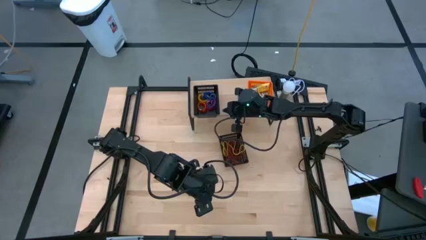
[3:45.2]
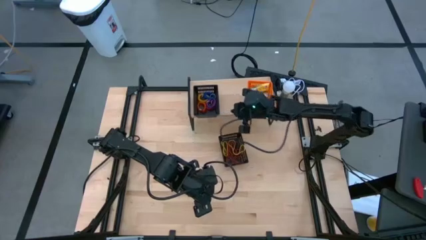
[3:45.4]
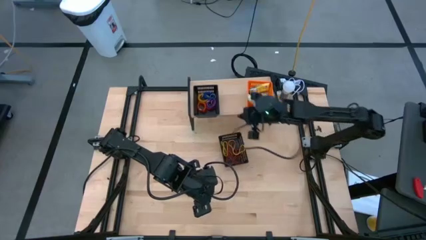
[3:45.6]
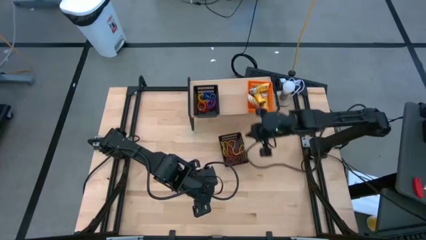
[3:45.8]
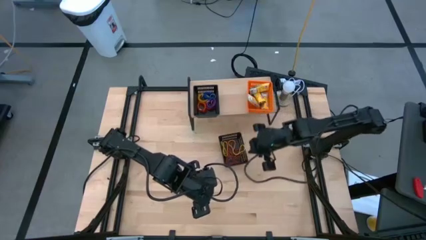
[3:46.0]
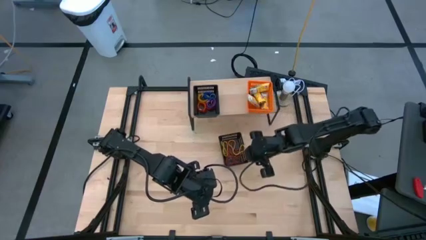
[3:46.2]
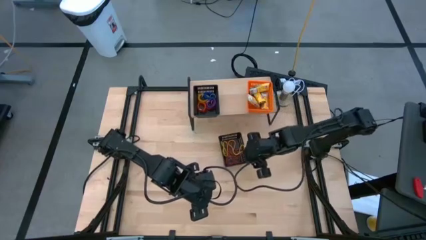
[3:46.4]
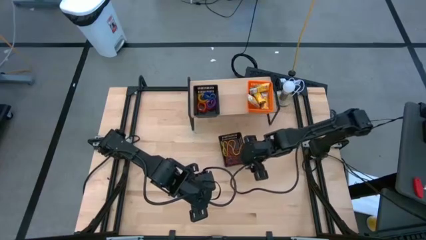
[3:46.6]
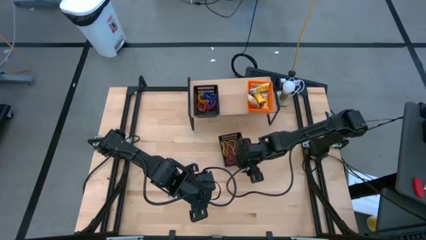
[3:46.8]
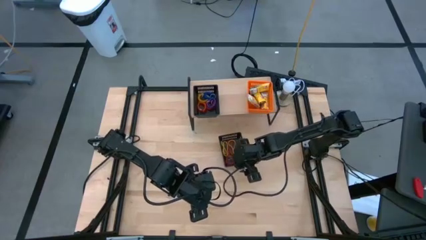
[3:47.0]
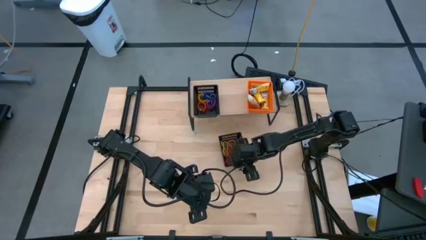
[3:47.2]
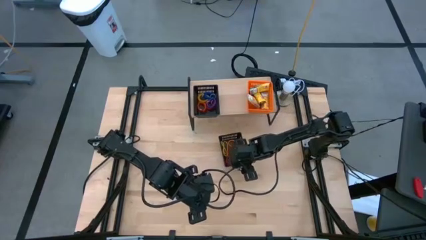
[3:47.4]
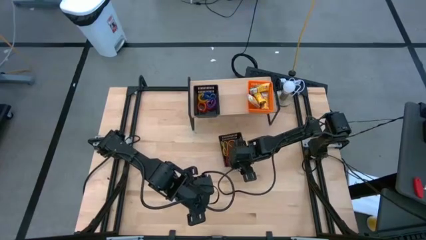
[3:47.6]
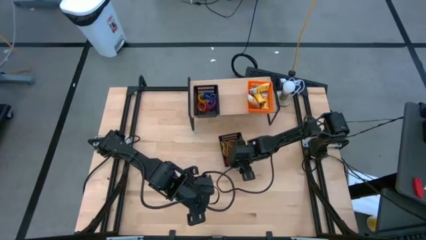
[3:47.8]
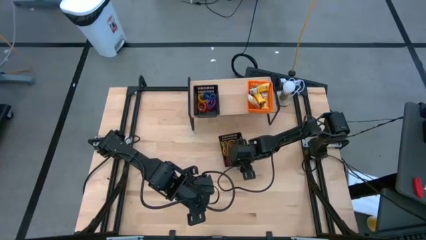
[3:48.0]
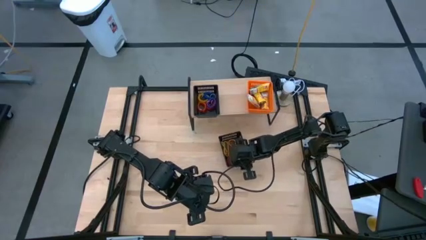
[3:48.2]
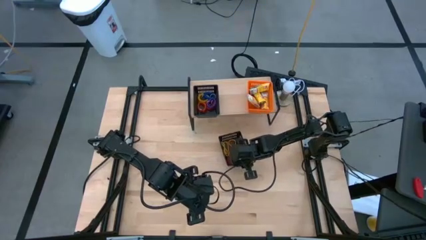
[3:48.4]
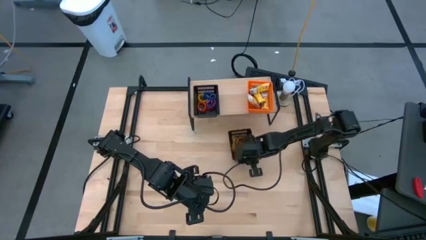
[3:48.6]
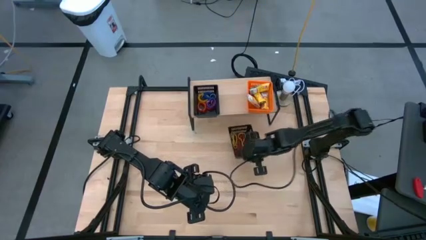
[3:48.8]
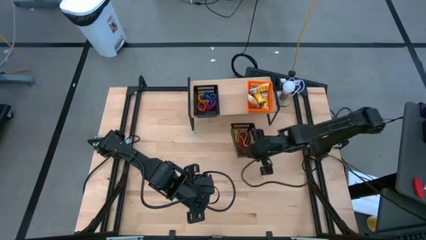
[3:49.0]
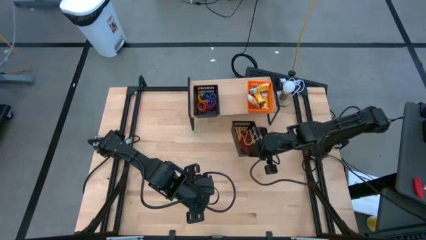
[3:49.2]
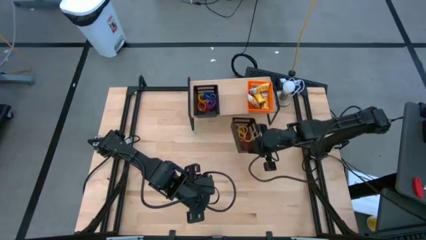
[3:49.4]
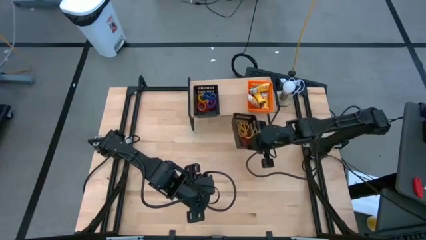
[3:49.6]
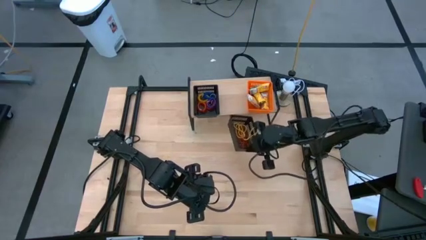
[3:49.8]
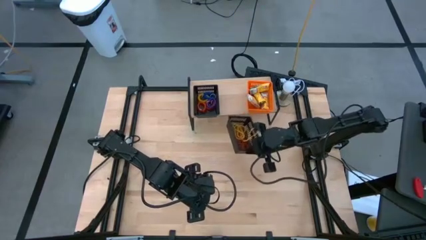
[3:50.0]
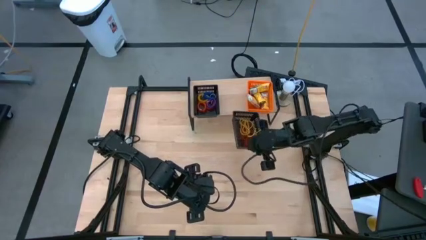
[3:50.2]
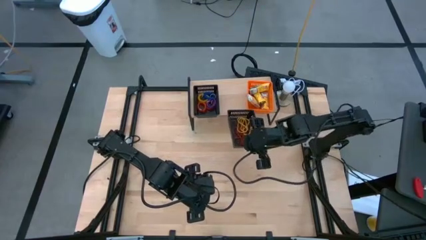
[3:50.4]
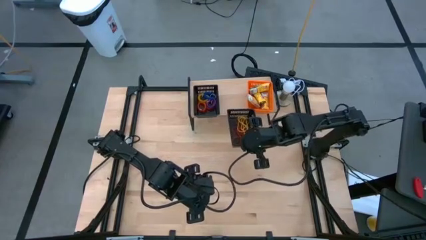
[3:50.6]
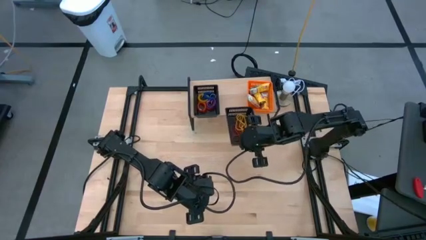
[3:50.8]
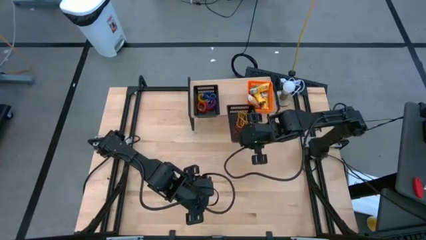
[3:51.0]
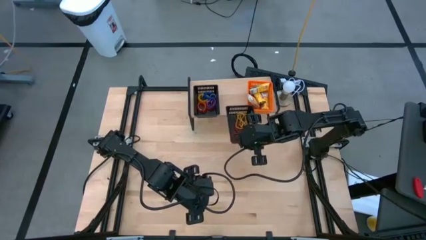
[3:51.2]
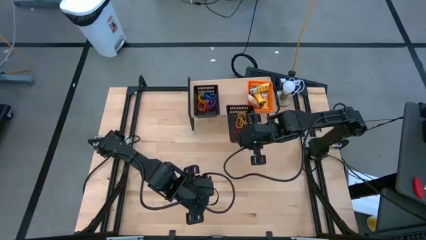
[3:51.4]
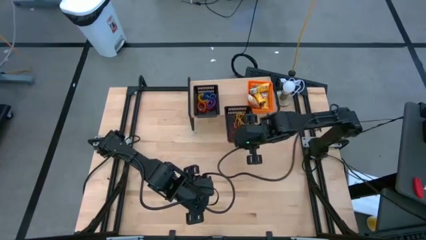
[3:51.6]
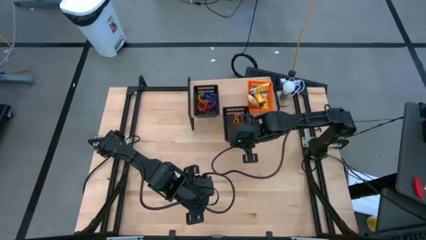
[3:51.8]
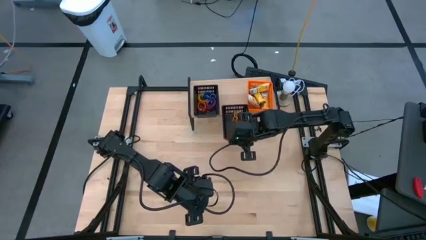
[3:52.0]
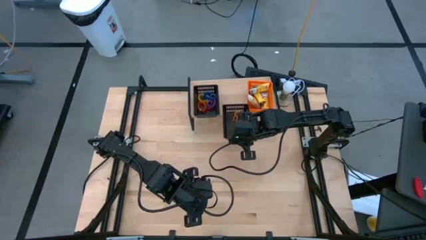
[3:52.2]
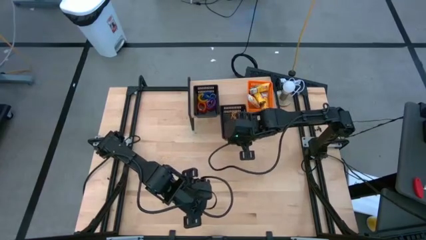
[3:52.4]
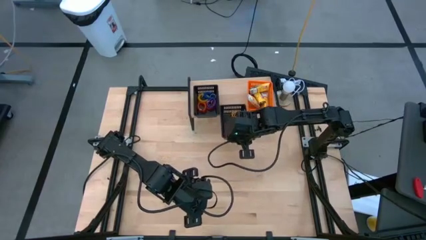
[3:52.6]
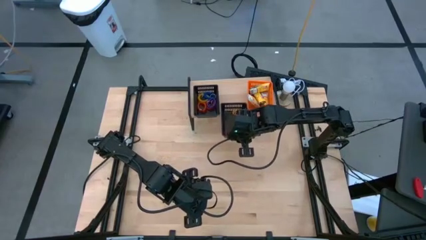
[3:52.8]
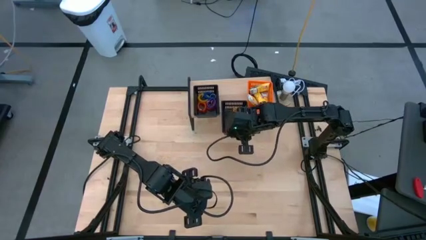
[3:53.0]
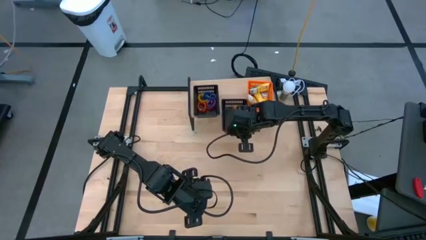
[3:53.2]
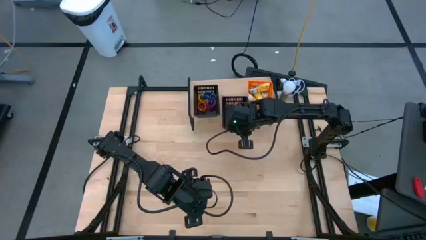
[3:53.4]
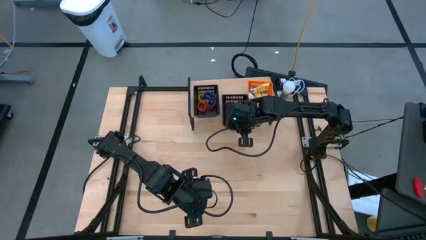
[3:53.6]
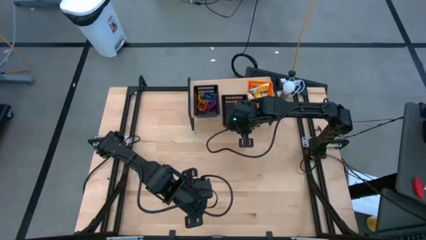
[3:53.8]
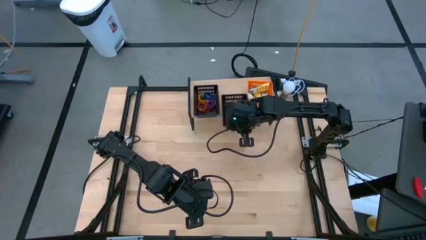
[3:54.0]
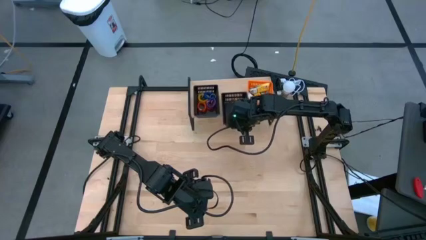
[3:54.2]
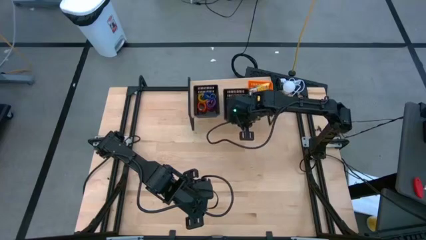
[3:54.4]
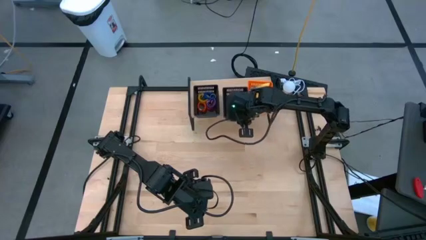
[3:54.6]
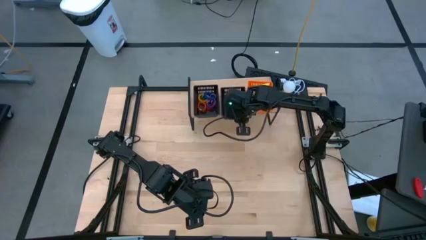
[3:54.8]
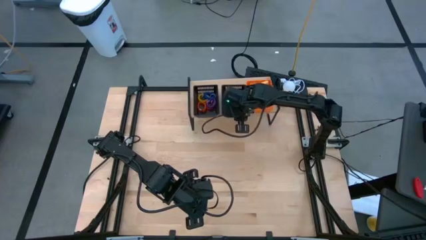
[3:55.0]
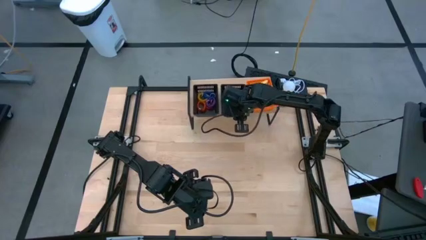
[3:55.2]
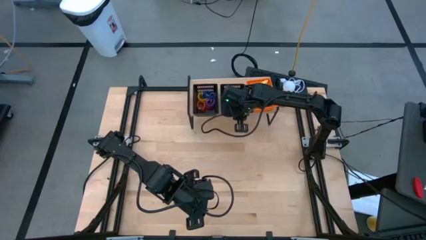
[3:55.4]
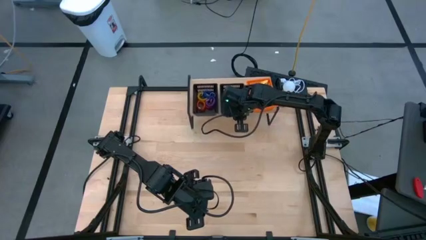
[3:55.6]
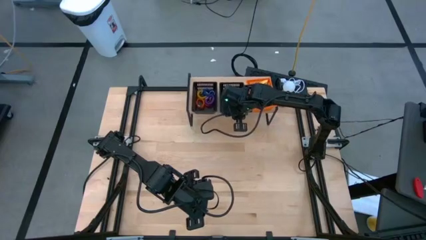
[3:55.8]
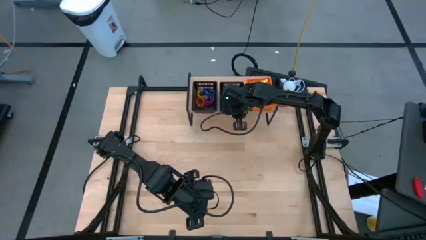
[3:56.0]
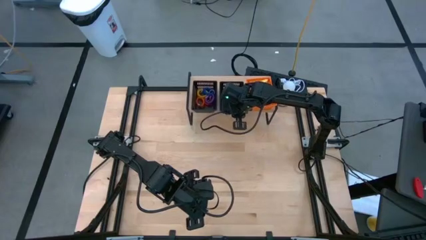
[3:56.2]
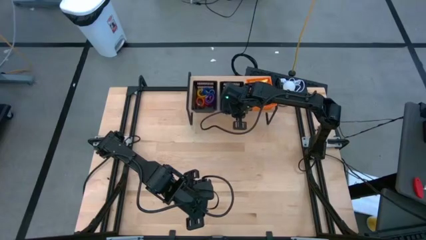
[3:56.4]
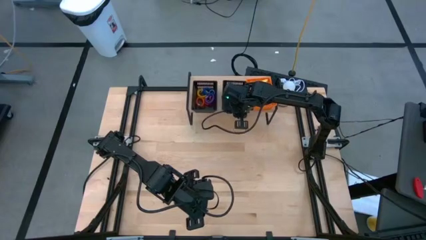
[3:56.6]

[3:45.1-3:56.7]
Task: Pick & Place Office Desk Supplies
Put the black bin with rubber band on the shelf

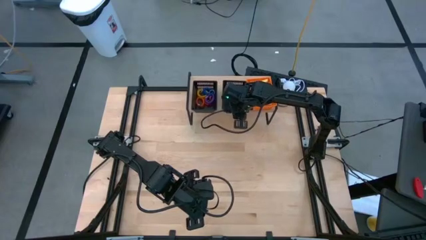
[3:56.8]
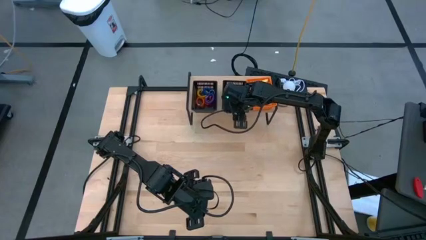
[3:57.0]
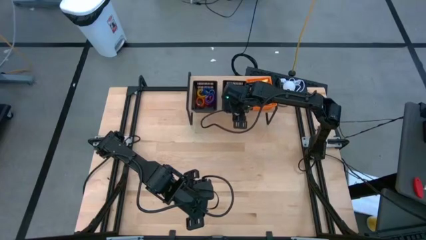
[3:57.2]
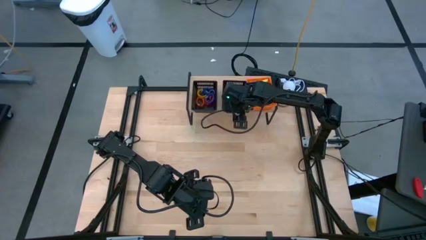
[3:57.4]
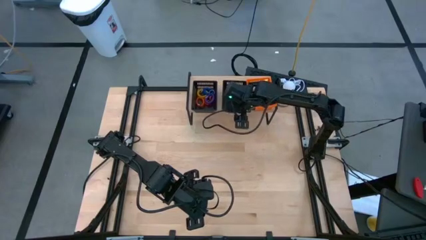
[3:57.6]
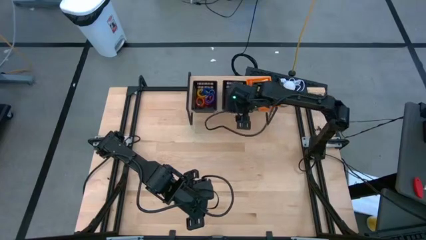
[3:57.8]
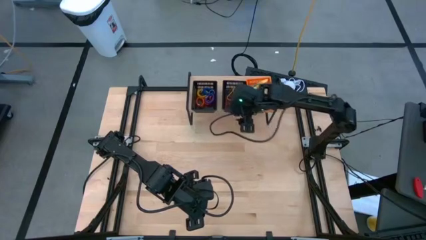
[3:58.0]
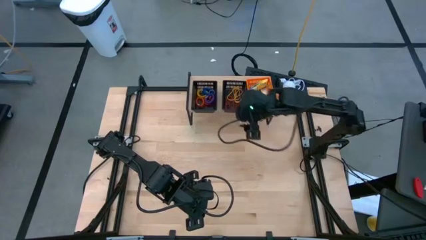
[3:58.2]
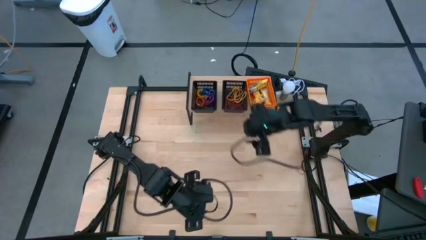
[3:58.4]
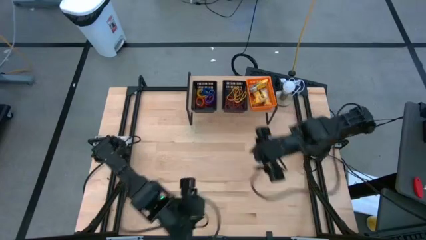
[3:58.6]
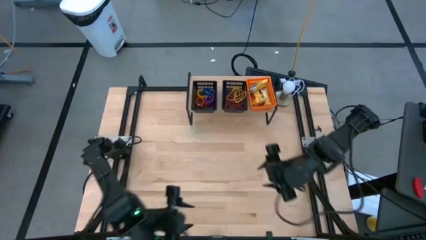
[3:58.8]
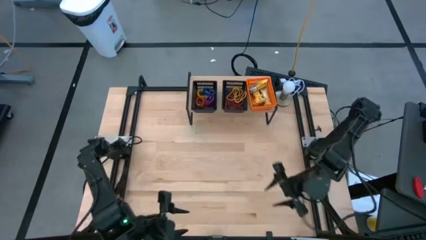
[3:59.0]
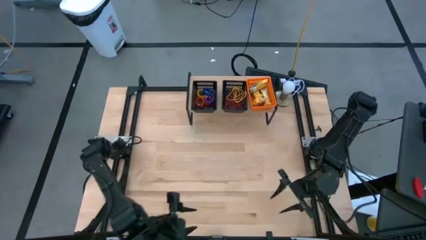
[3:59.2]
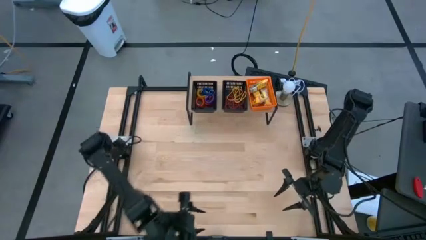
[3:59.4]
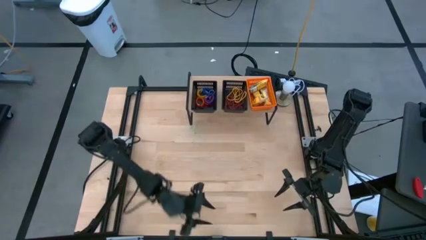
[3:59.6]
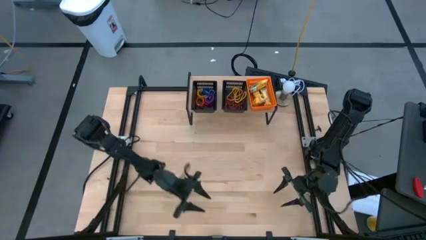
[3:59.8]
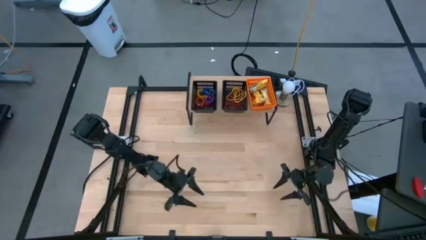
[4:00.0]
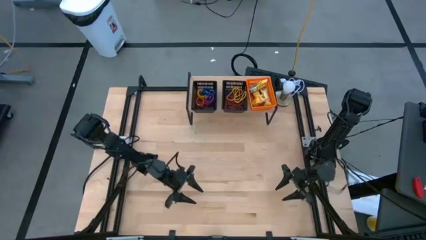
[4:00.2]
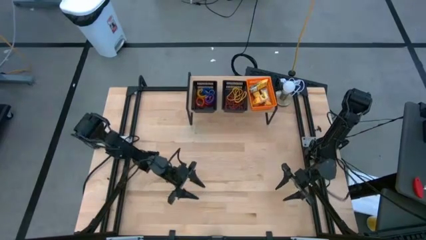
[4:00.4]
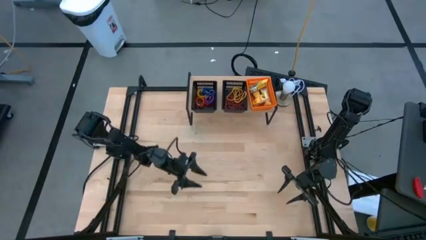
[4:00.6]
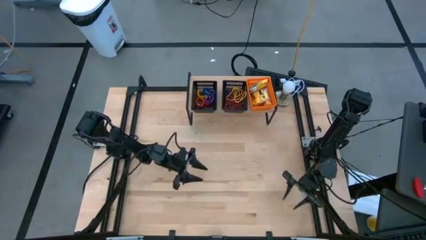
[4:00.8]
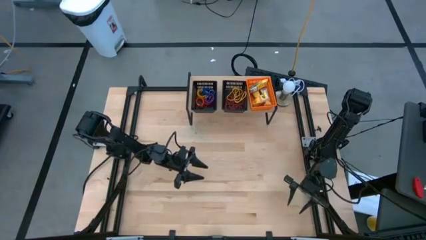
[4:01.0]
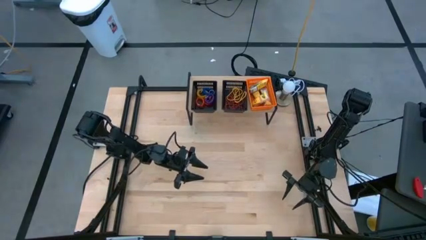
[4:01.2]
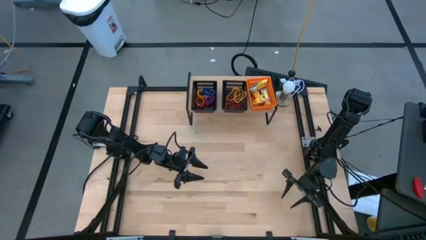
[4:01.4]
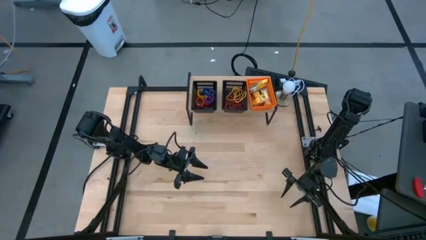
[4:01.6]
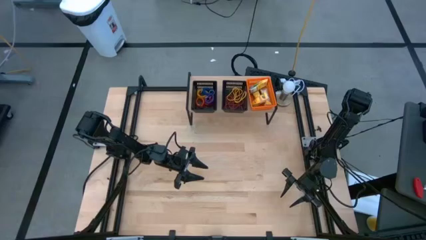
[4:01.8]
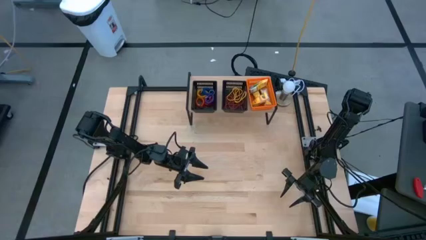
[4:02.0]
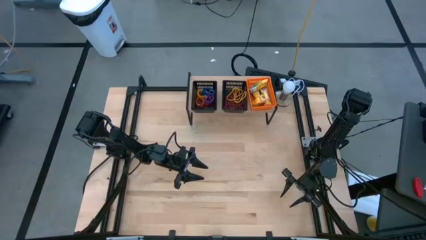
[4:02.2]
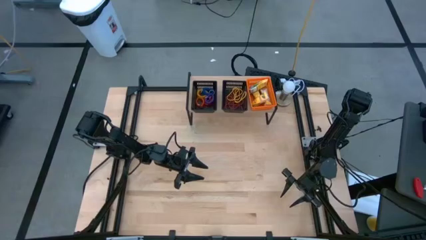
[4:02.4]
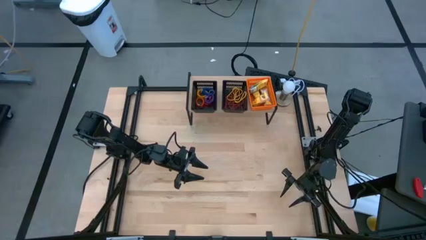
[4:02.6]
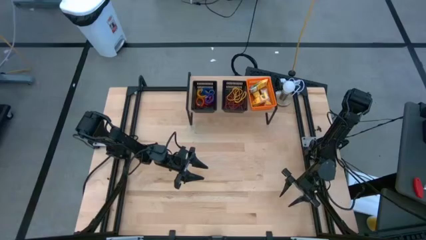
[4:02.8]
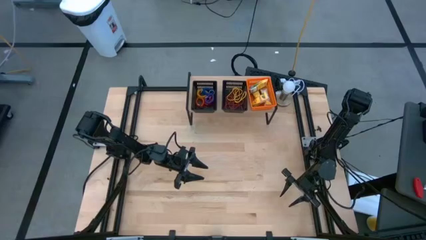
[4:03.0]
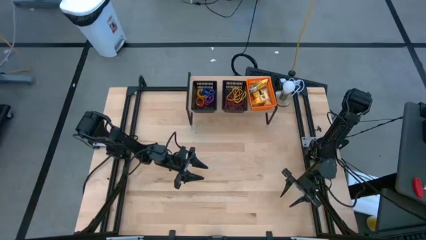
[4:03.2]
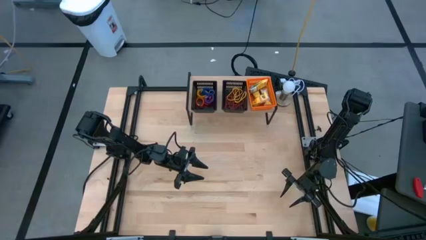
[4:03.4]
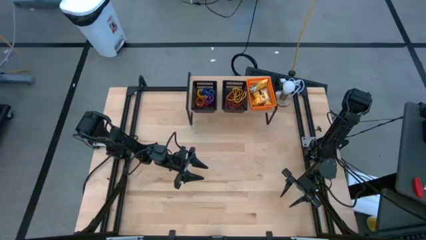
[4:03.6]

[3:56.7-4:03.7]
Return to Home Position
